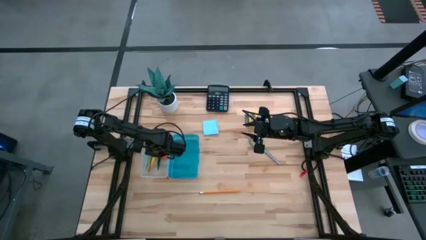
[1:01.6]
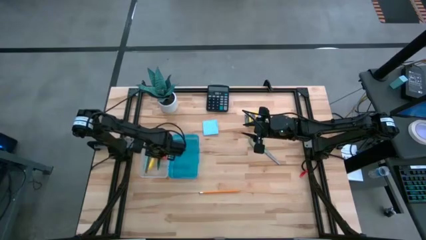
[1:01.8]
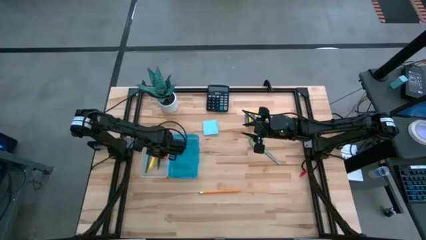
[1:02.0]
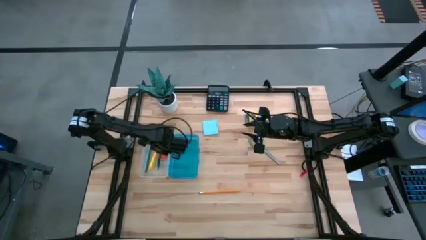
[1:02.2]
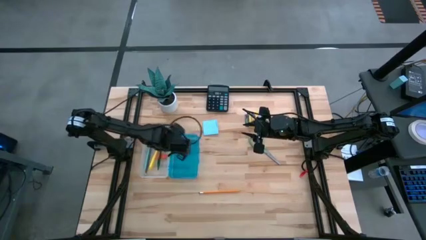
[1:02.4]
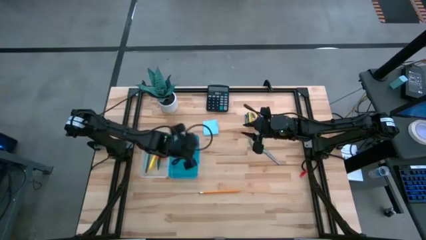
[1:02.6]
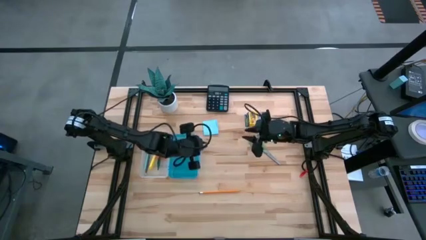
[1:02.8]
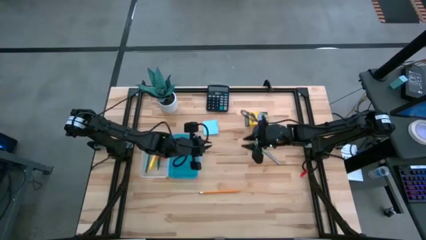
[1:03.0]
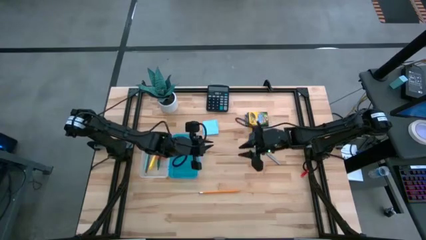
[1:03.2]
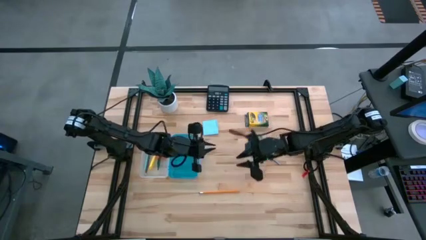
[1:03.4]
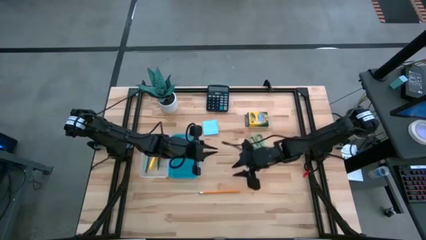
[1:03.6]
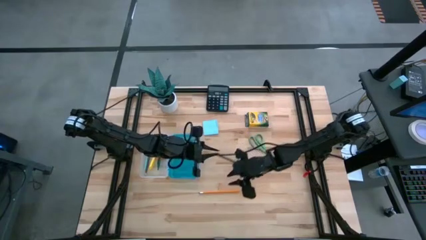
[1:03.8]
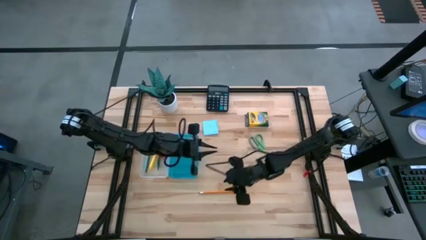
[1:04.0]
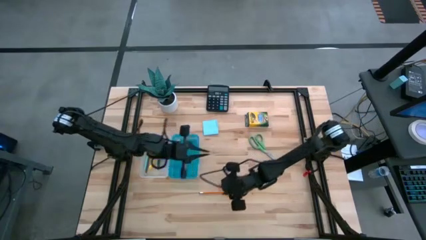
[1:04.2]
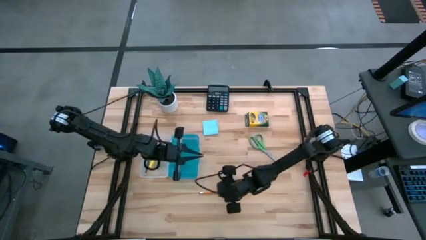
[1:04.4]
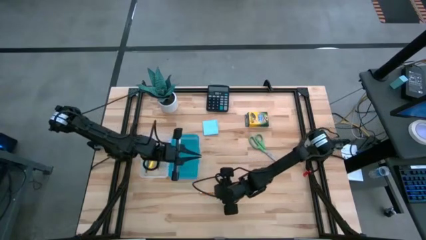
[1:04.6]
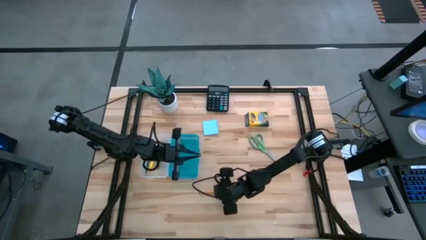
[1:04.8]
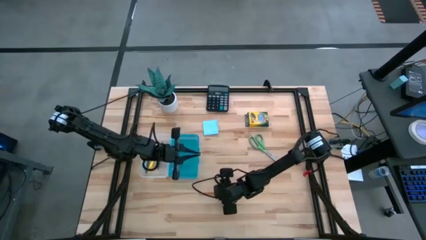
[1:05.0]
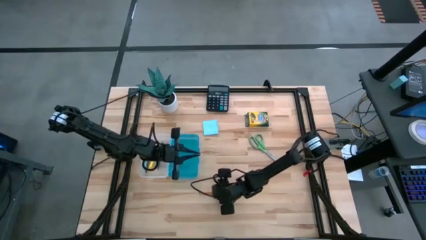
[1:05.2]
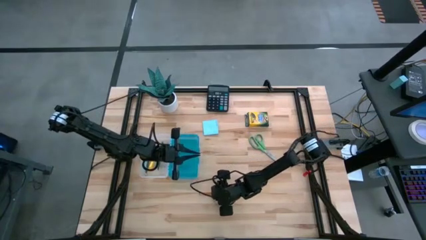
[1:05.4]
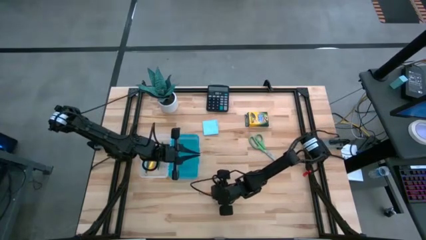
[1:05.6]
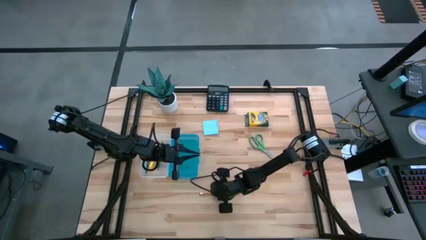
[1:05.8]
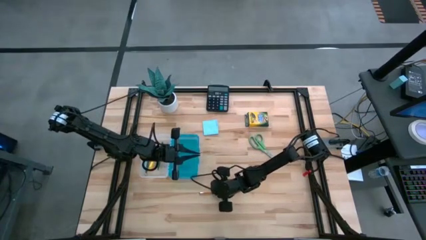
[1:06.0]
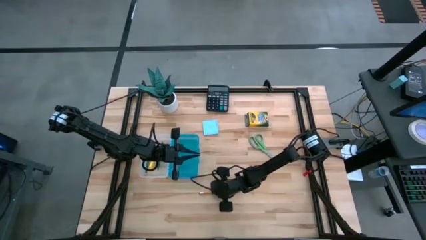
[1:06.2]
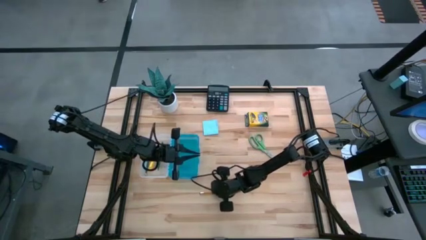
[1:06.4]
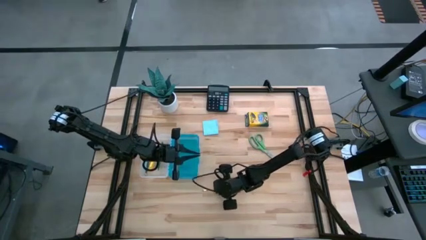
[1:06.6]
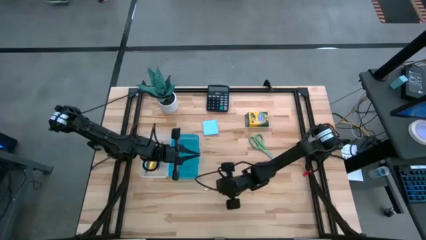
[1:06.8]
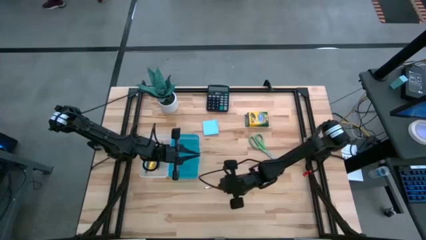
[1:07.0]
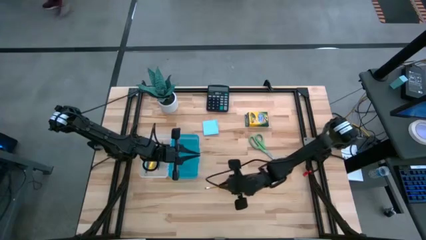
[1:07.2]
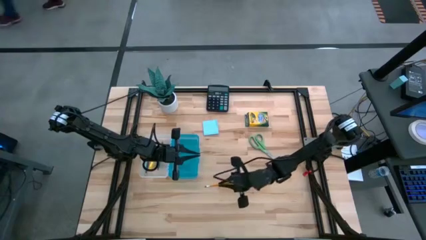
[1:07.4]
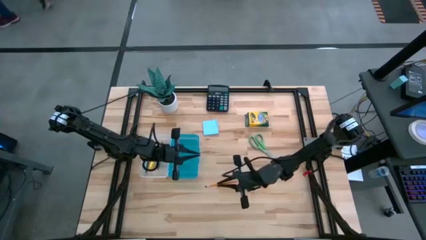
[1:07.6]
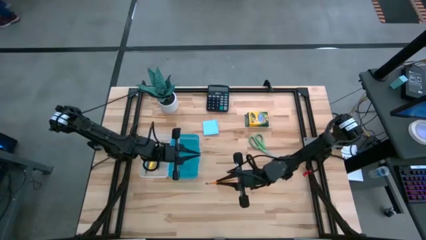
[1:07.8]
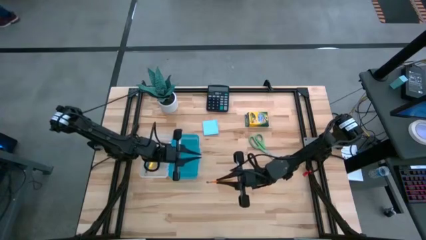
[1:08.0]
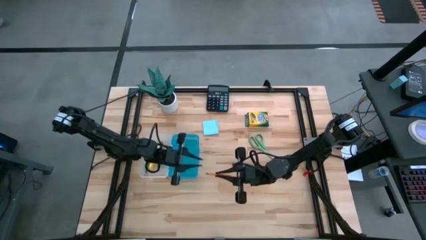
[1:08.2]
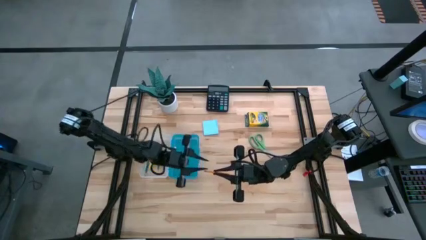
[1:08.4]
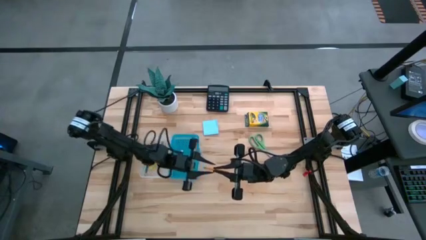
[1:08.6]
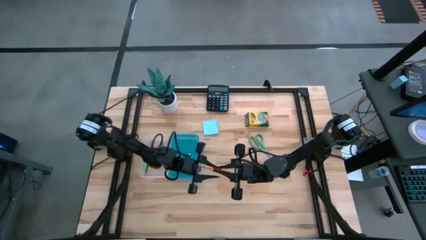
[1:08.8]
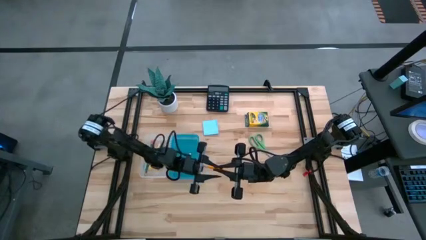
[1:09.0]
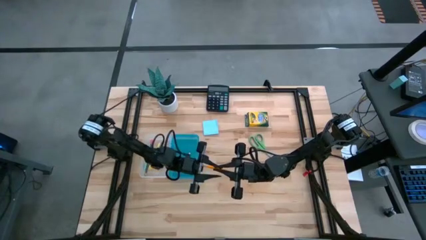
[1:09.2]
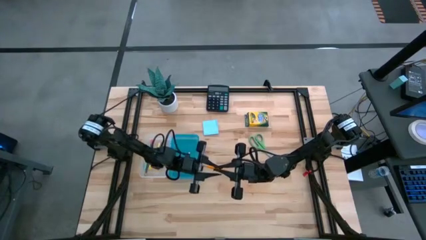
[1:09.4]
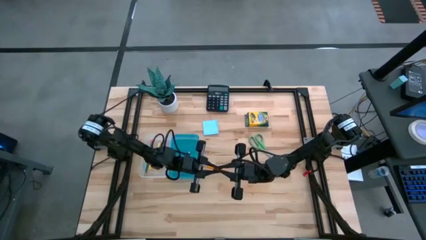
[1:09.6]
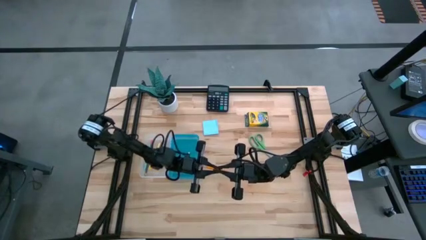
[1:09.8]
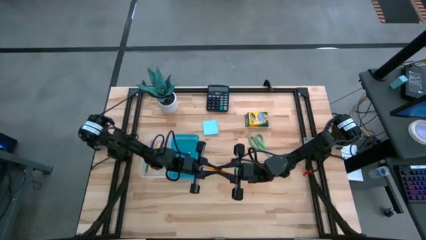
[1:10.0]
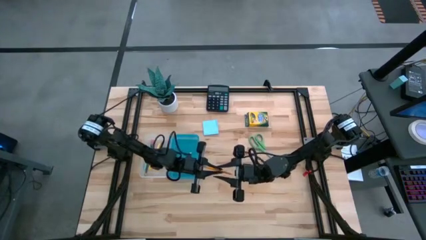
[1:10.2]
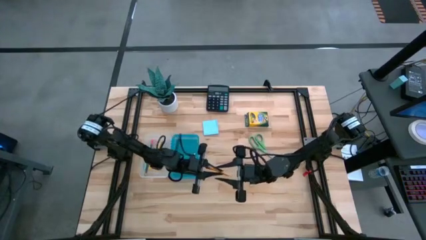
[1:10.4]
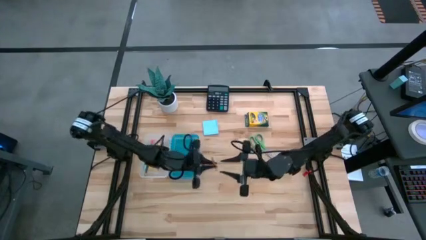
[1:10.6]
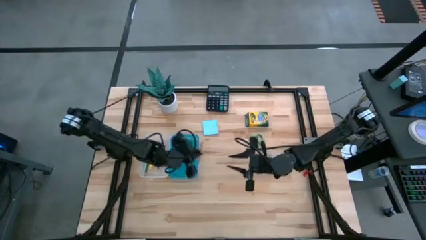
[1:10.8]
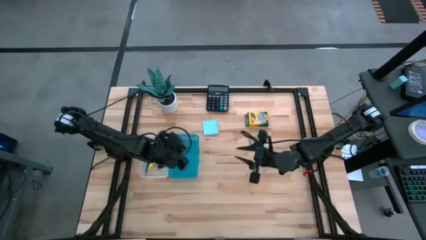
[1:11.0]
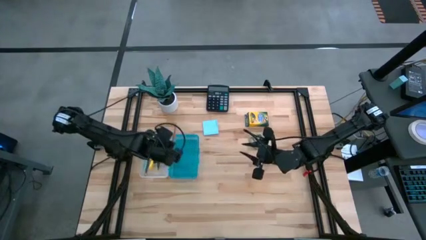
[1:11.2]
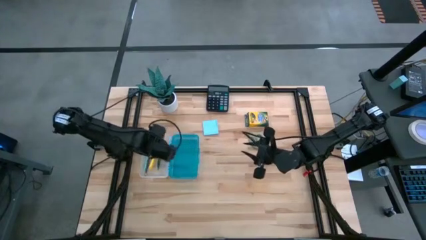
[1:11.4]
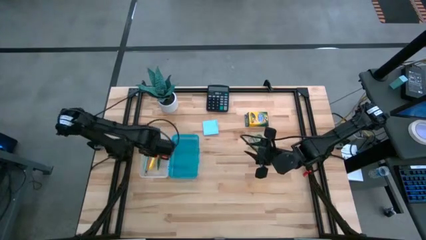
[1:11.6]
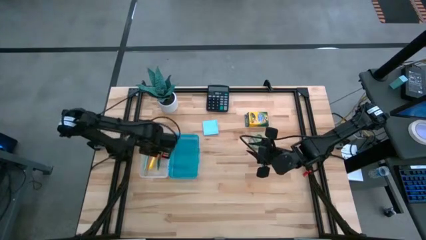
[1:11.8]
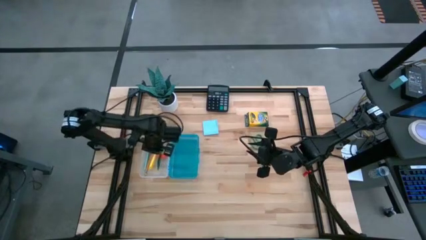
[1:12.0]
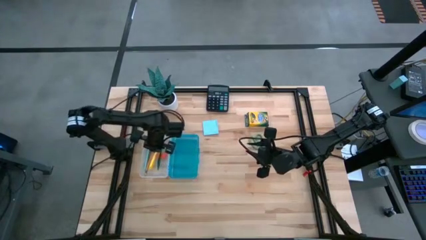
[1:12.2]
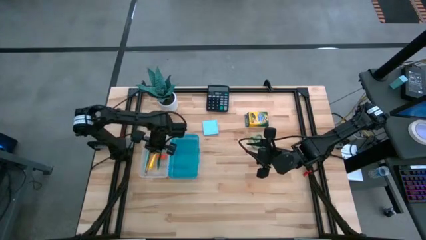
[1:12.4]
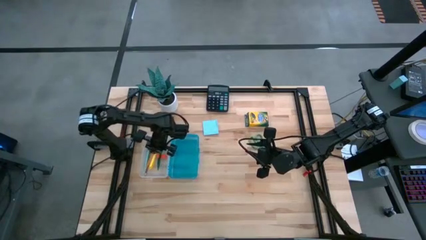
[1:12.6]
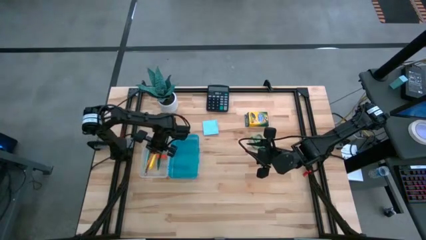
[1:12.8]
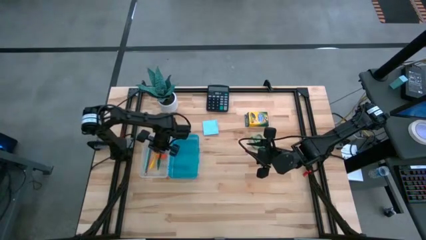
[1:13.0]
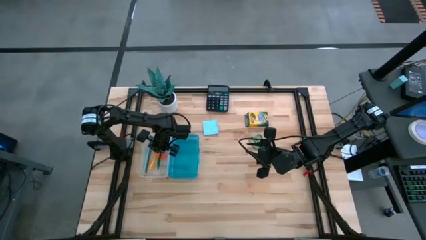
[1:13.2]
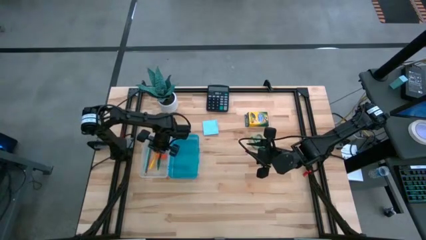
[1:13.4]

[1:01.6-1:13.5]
Task: Pack school essentials
Put the orange pencil into the blue supply box
